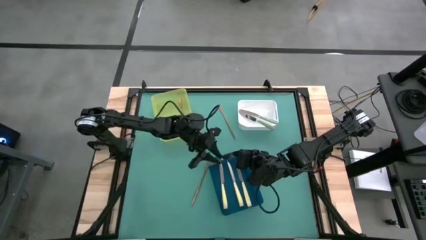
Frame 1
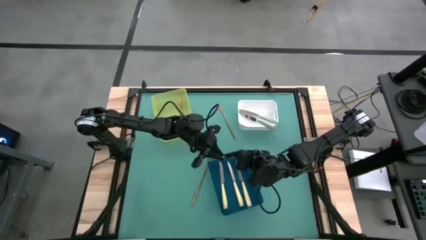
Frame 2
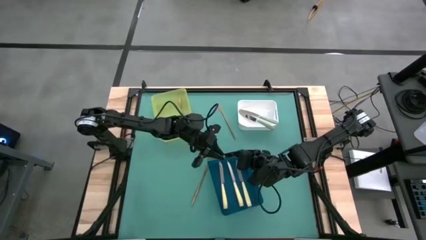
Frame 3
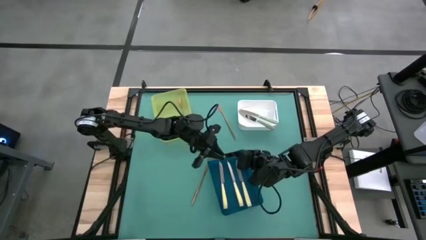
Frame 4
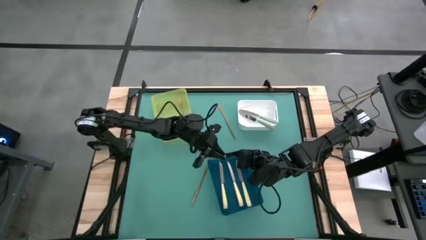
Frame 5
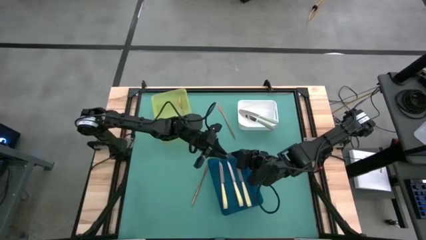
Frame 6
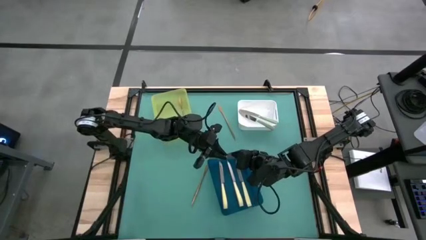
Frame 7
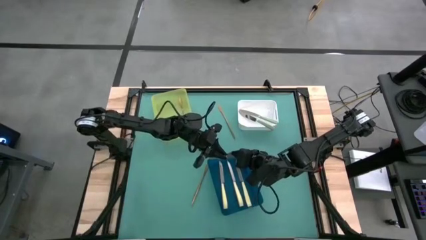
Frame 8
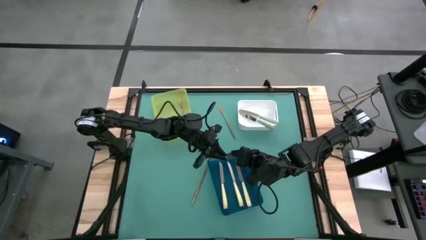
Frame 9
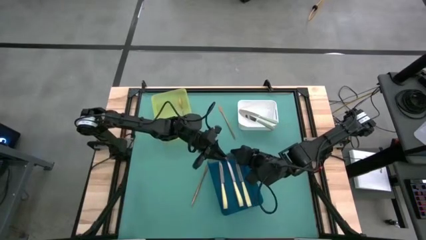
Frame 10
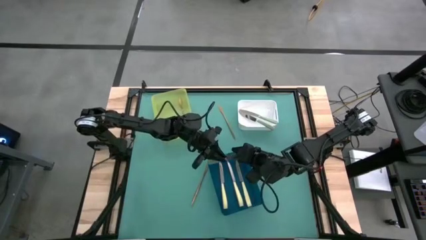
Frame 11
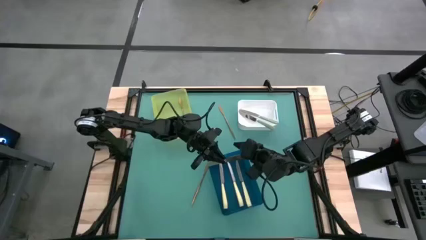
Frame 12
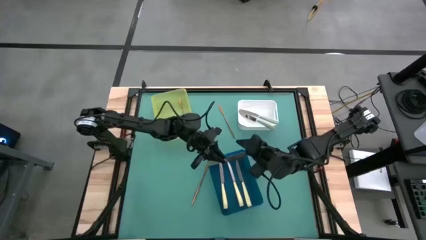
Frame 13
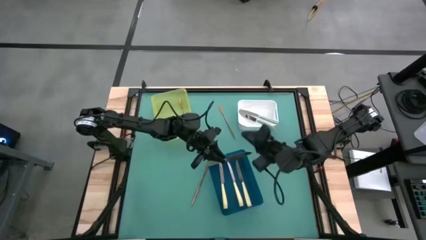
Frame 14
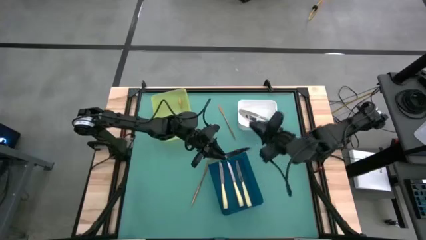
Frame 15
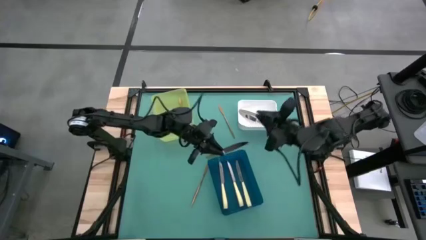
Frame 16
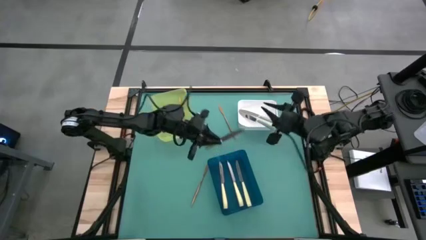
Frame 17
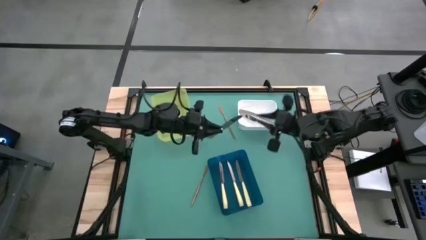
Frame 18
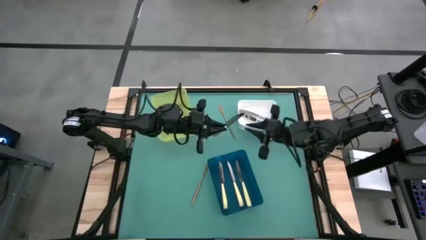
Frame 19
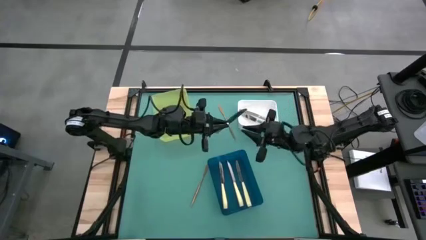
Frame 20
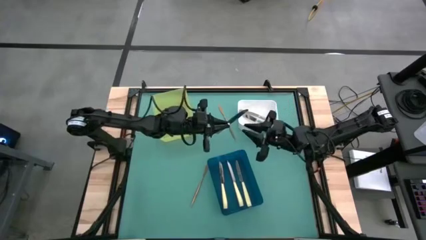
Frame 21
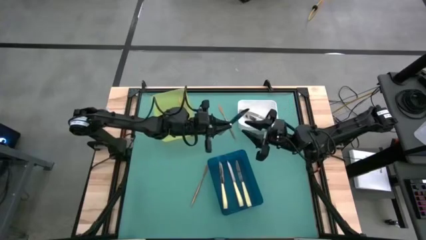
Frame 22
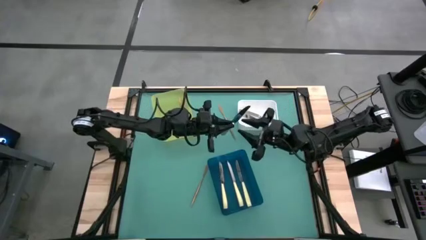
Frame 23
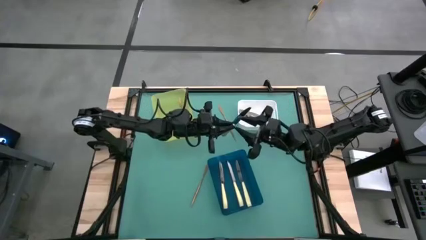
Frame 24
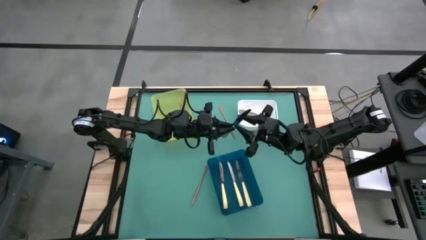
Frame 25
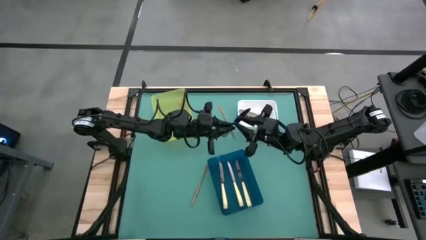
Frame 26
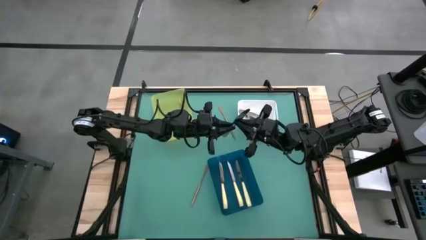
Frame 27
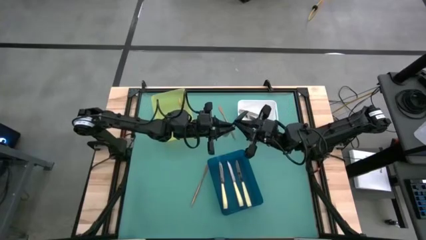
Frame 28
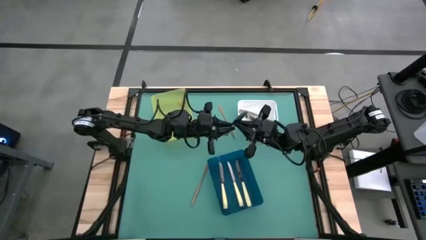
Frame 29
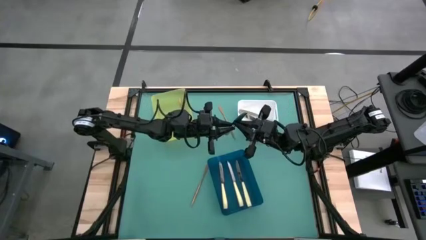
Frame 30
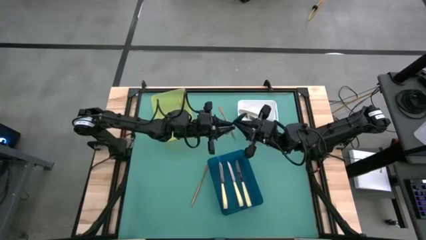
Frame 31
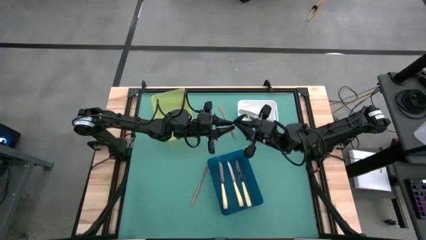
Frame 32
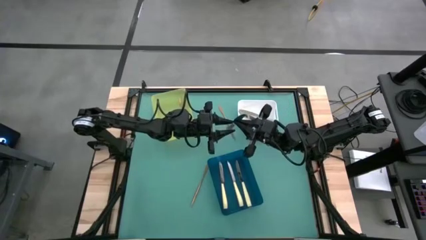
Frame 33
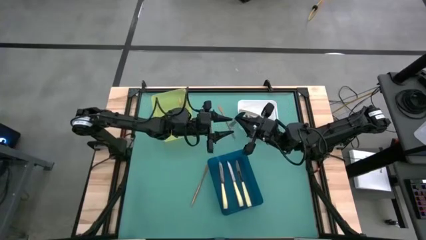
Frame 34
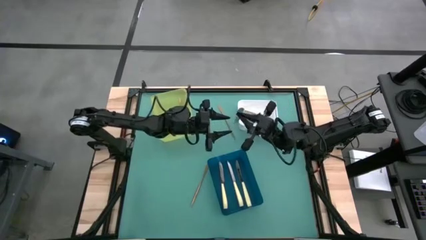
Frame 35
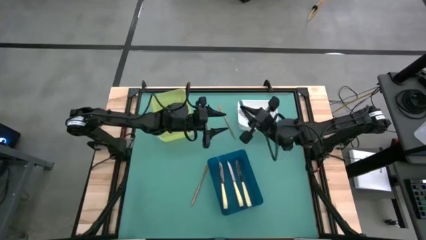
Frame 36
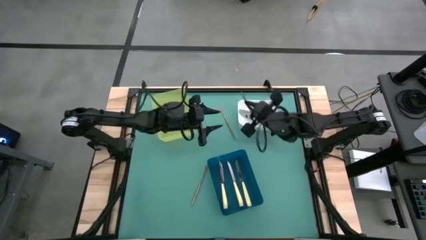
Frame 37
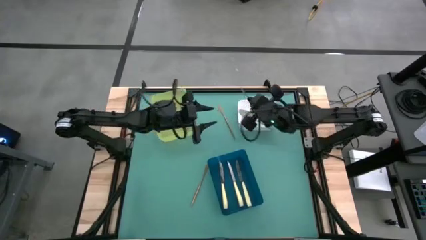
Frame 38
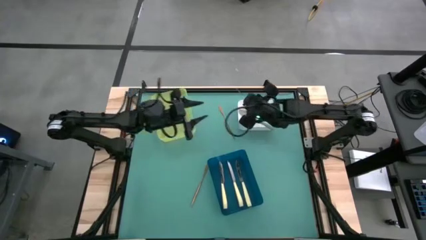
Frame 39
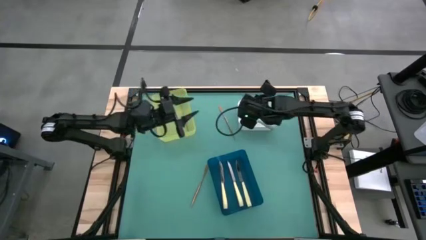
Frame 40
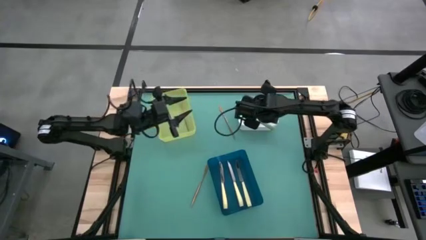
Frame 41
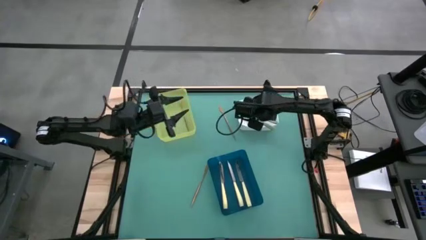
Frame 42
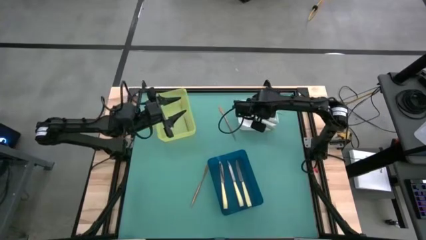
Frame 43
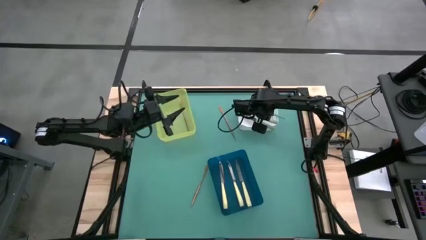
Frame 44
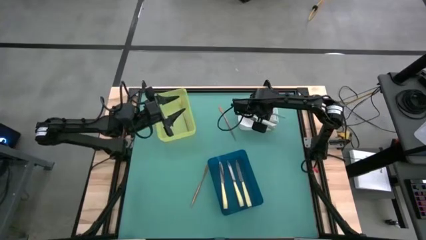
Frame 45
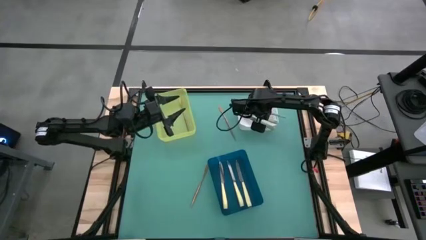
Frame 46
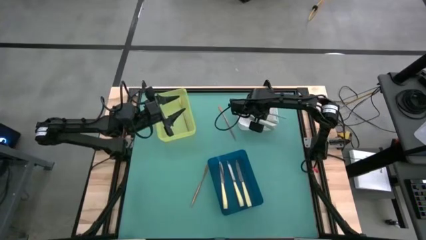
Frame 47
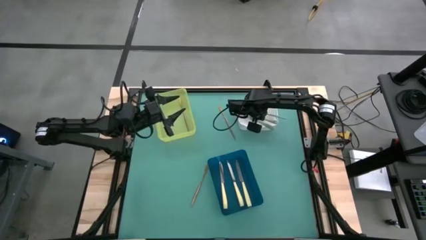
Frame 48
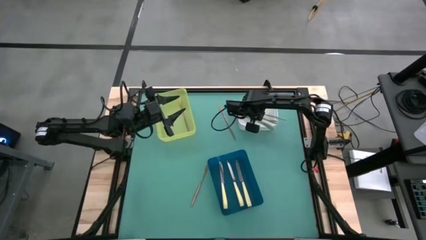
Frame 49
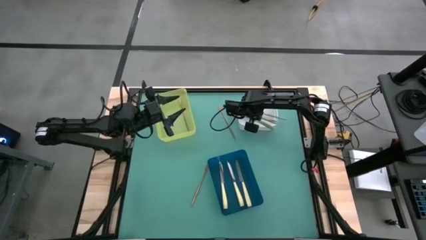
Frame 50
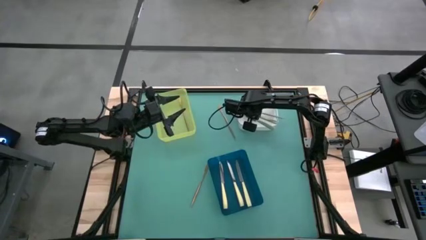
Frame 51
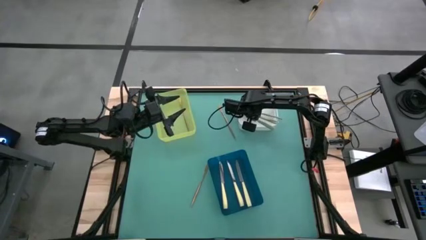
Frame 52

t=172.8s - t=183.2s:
Task: Sort silverware by color (type)
Put the green knife into the white bin
